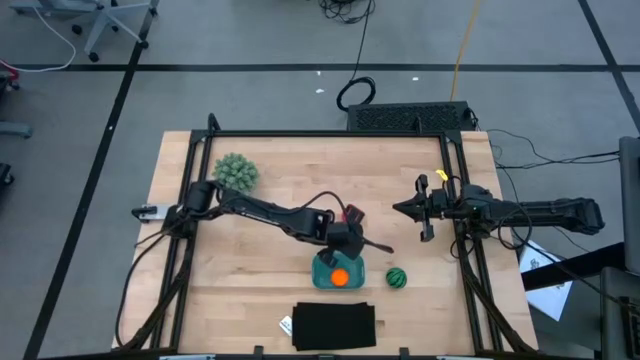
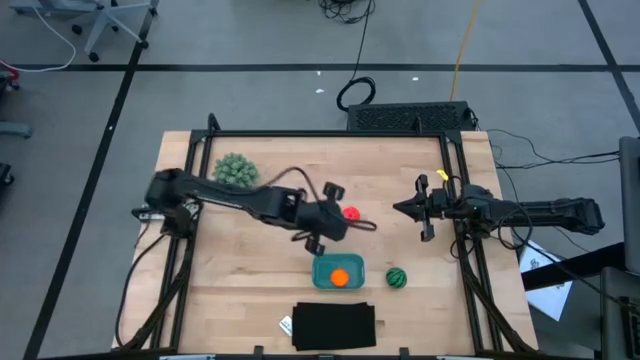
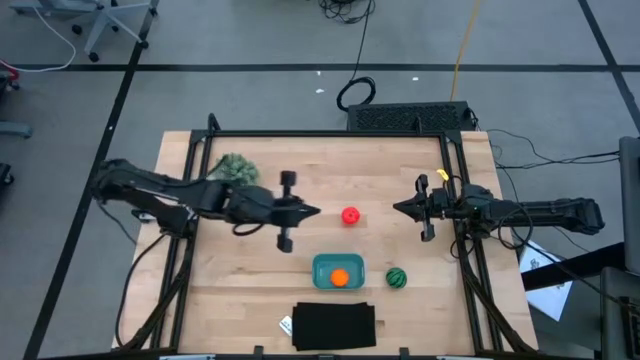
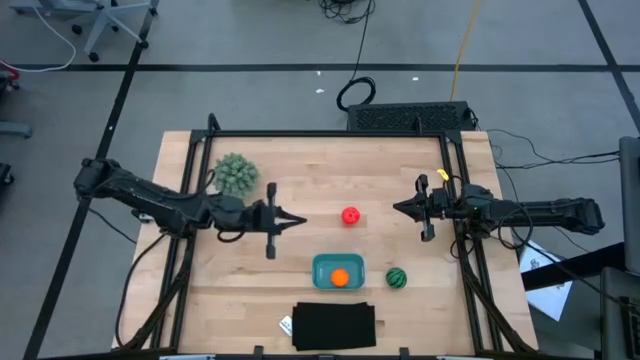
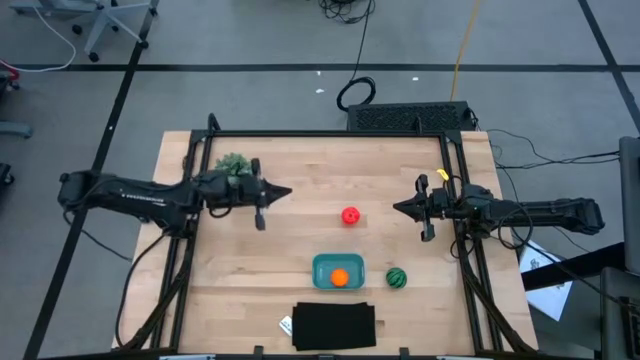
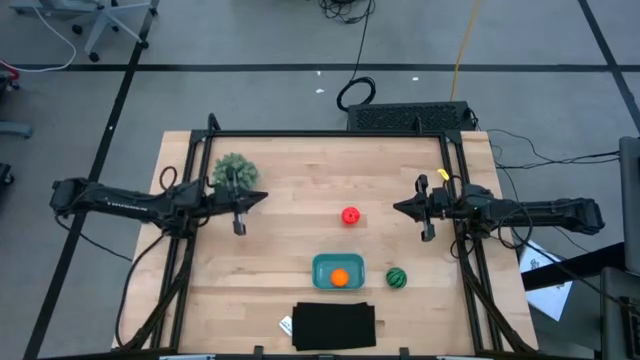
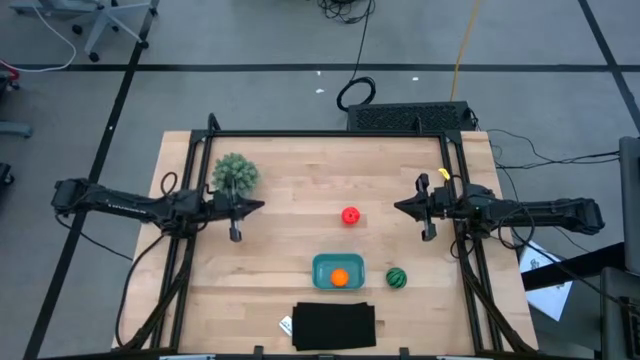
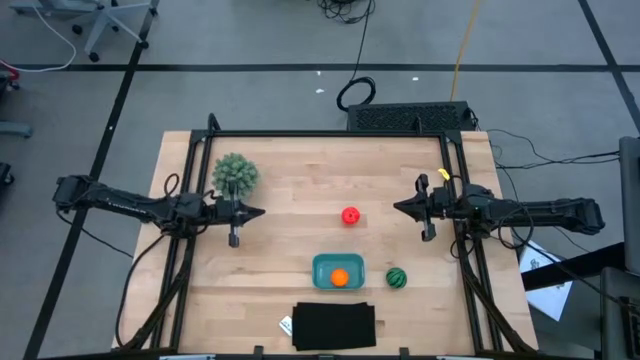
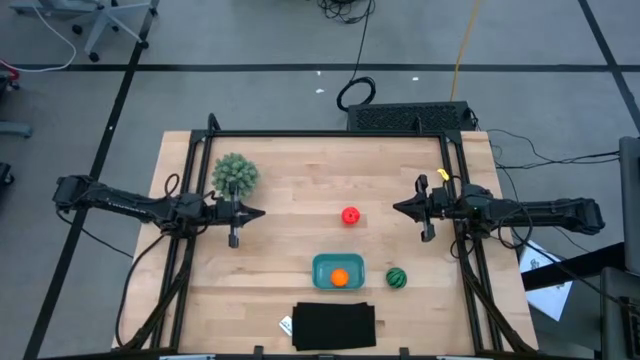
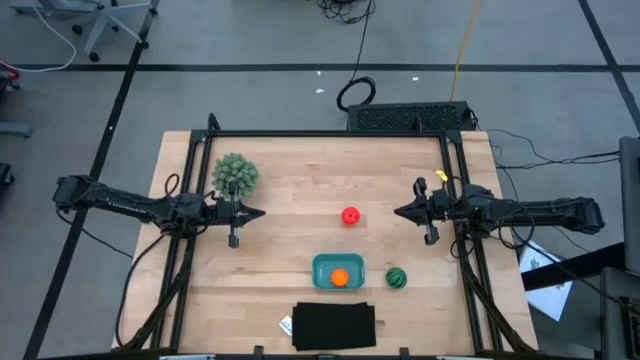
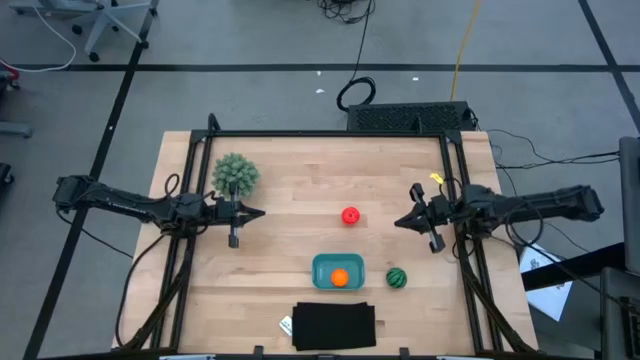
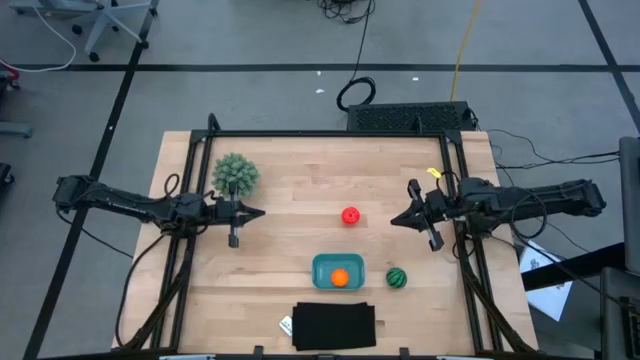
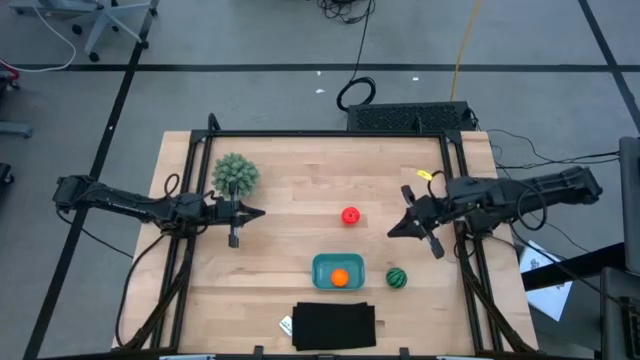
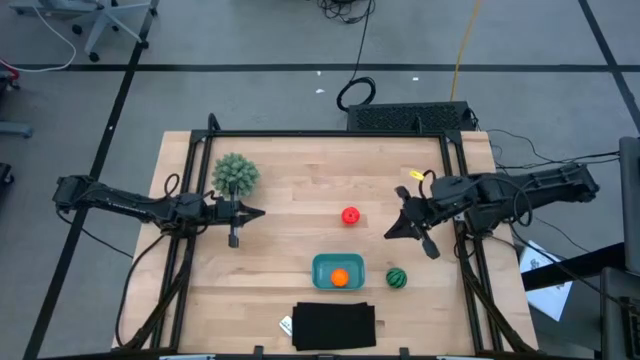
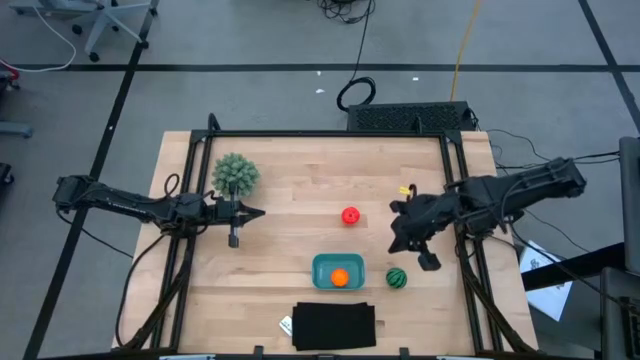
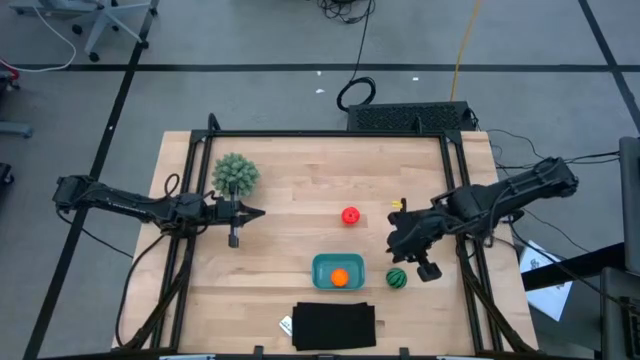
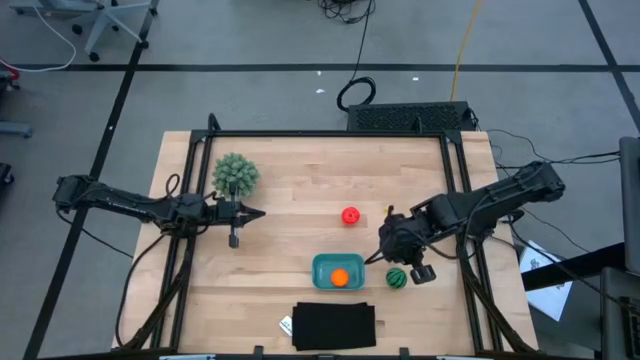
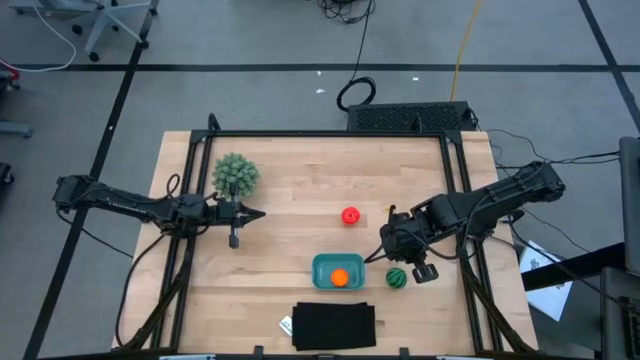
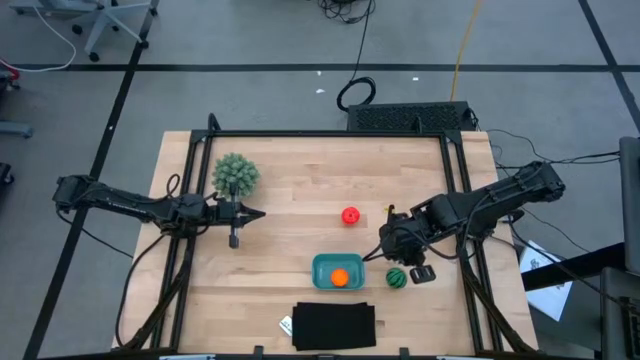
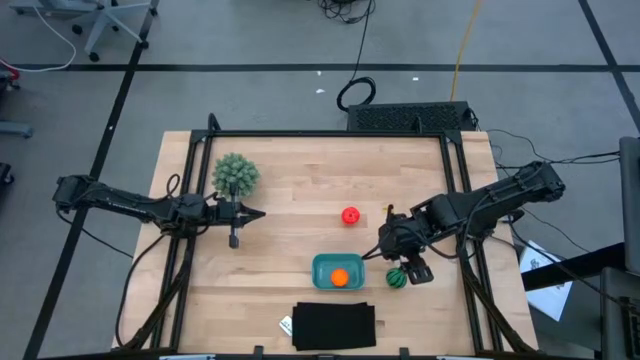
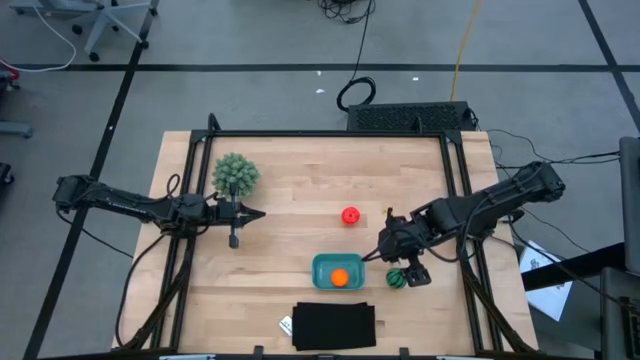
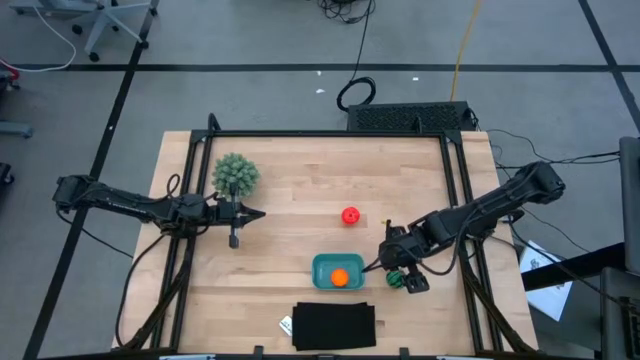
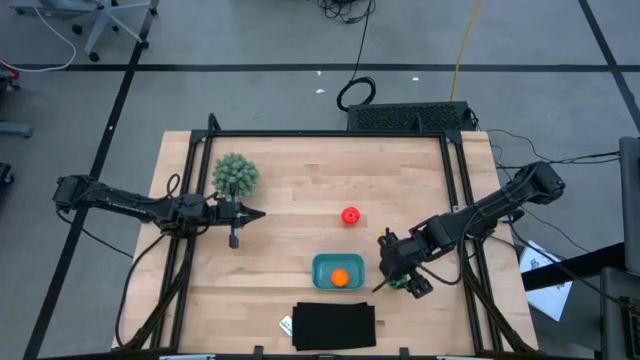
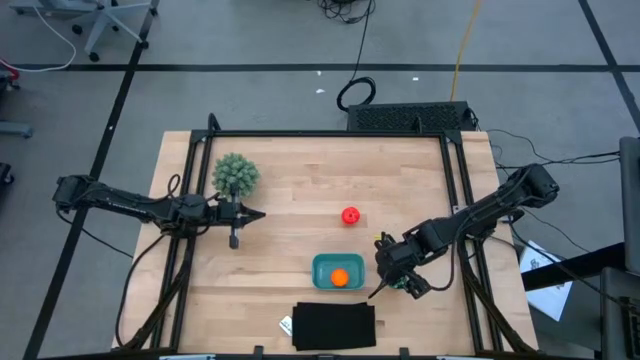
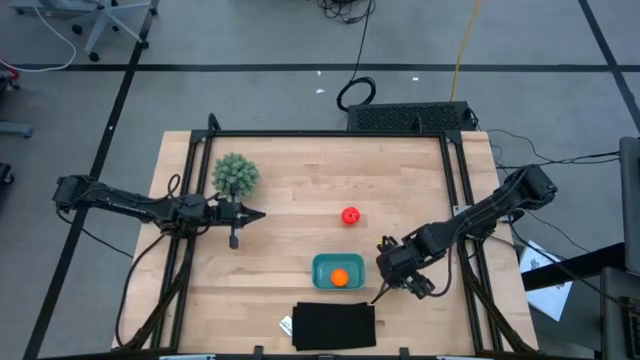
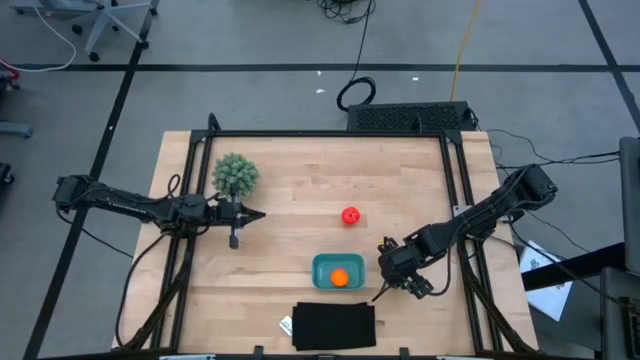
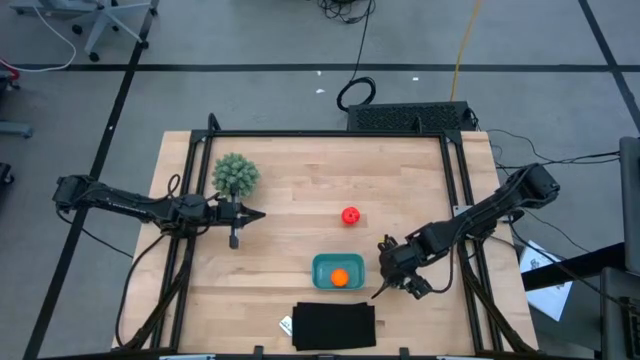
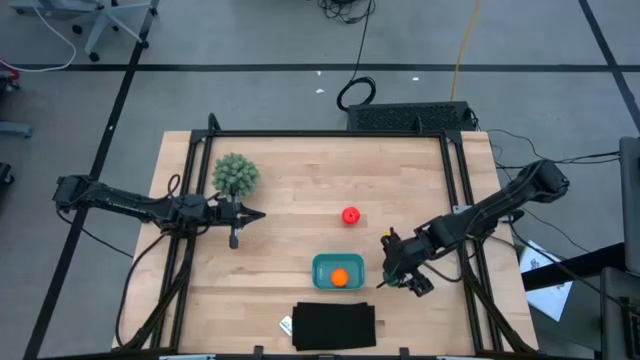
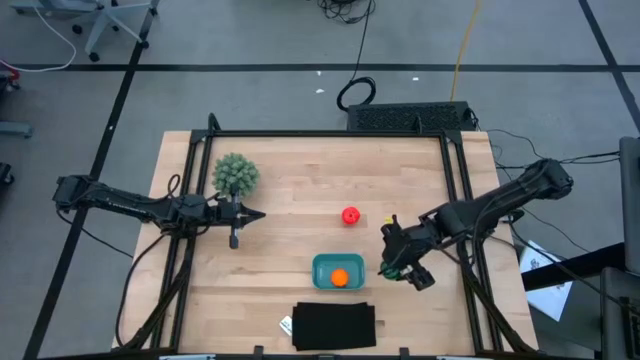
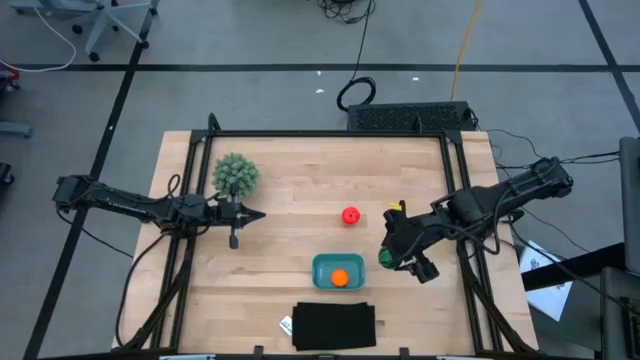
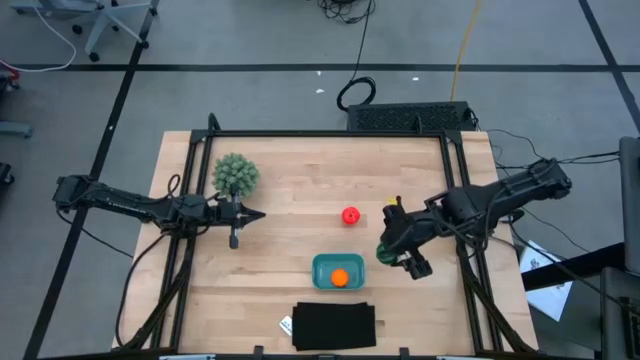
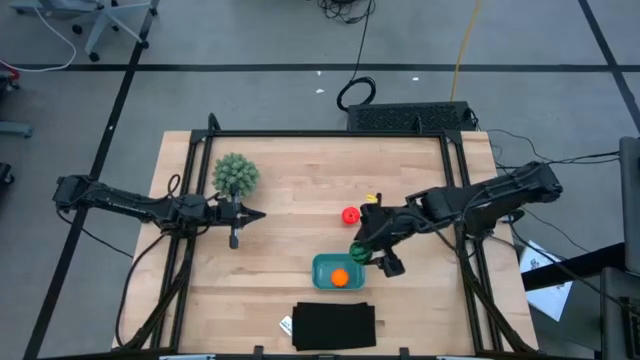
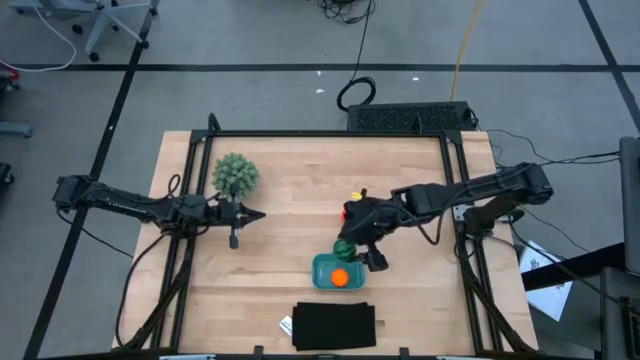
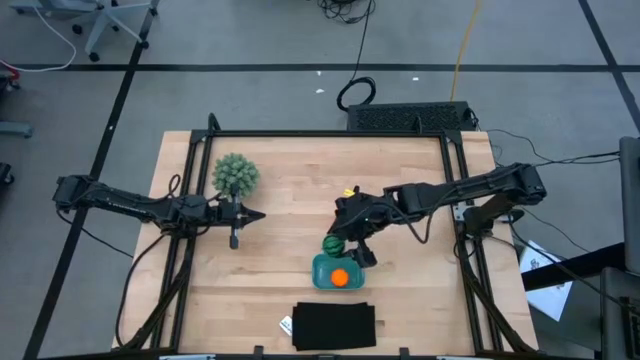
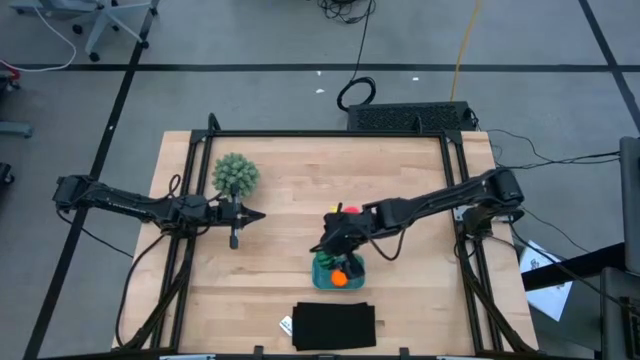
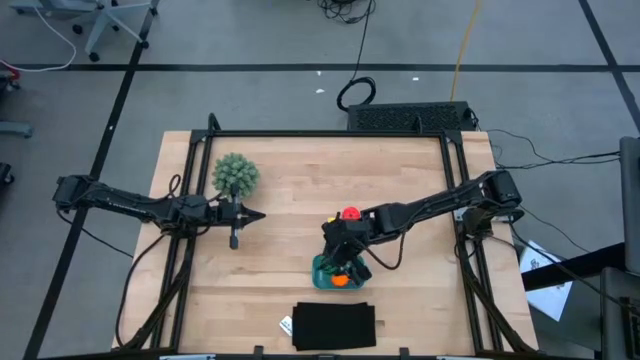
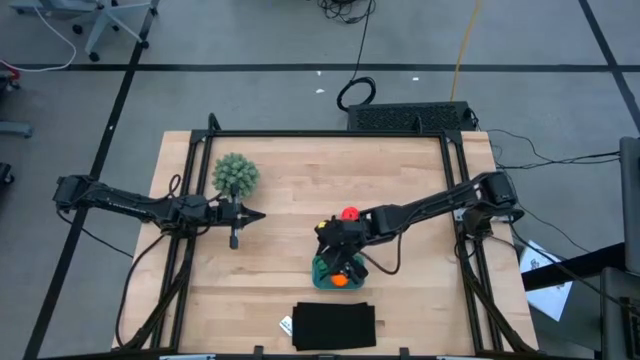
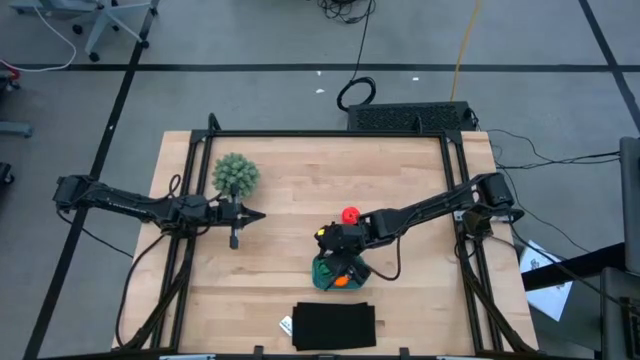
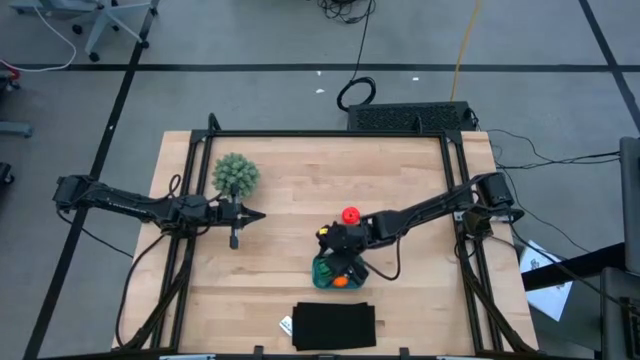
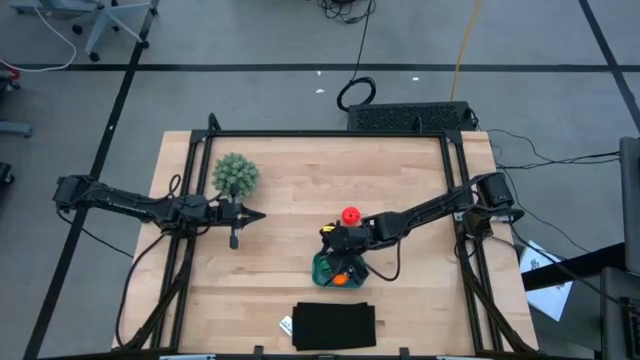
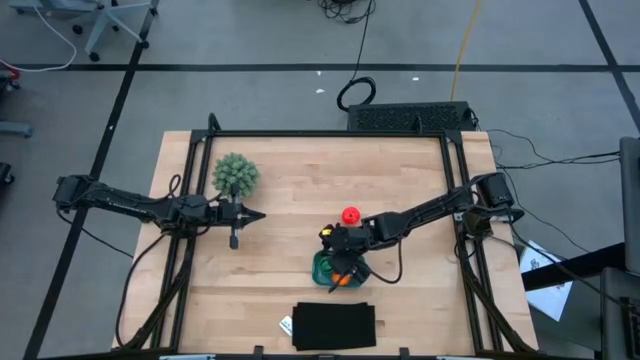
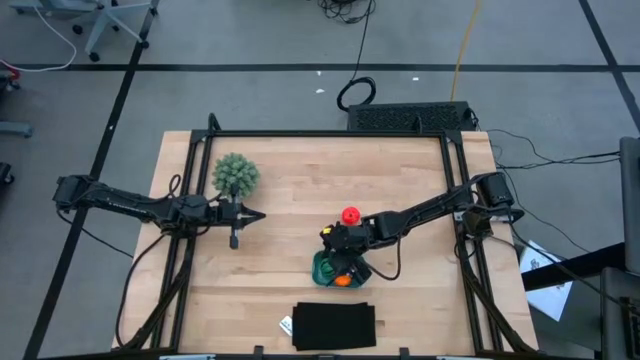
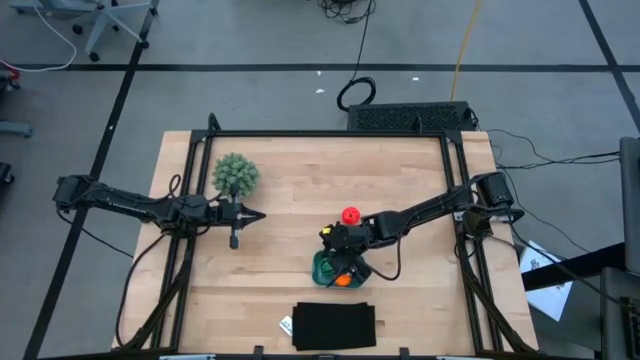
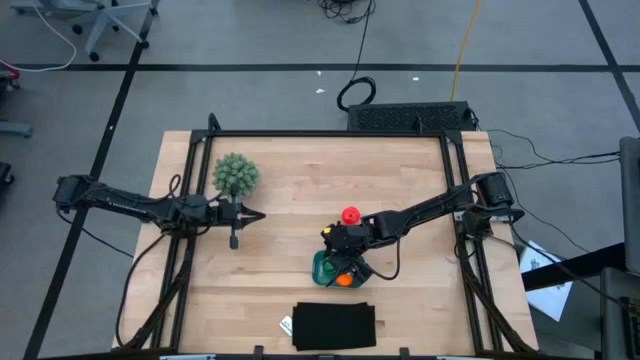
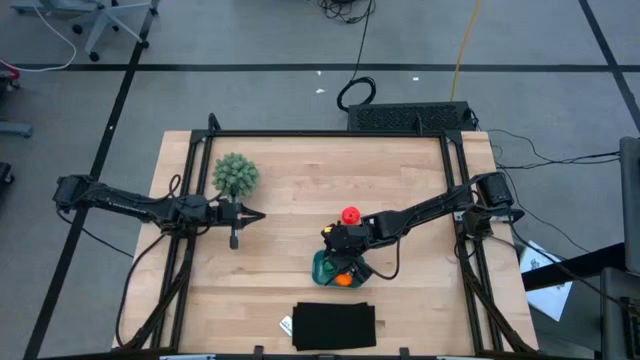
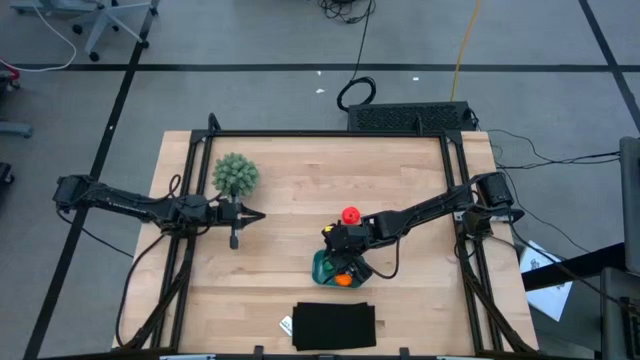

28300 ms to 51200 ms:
Task: Pick and placing Produce into tupperware
Put the watermelon in the blue bin
